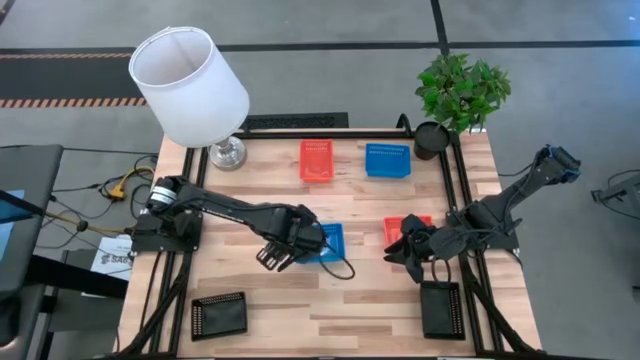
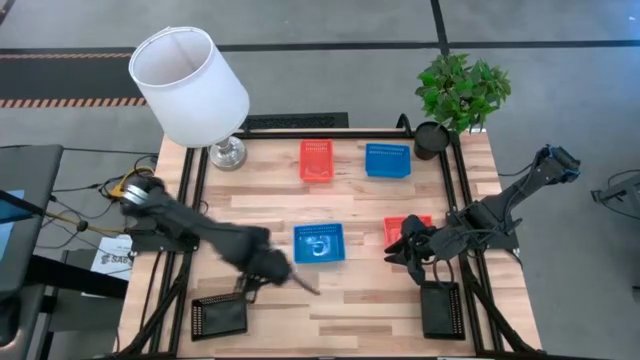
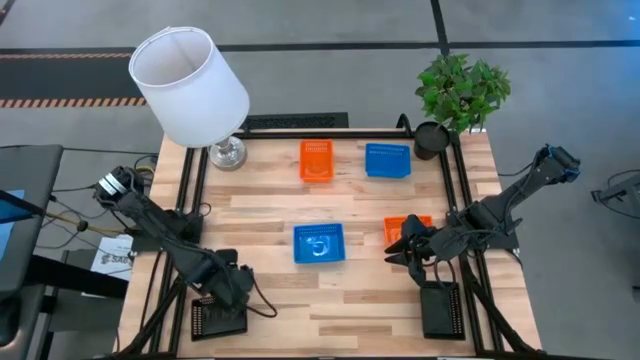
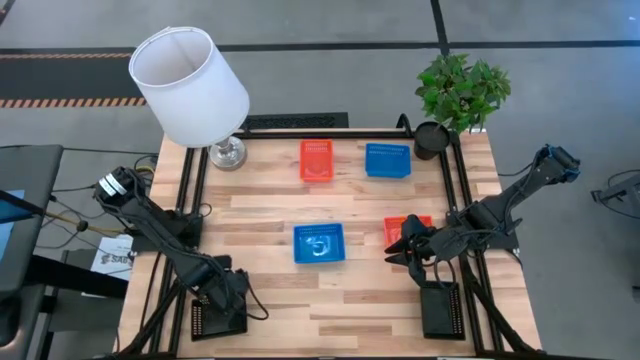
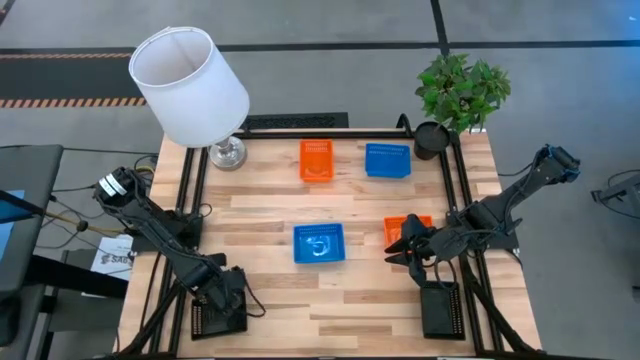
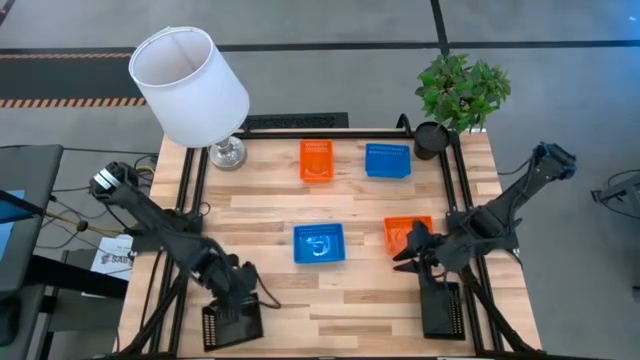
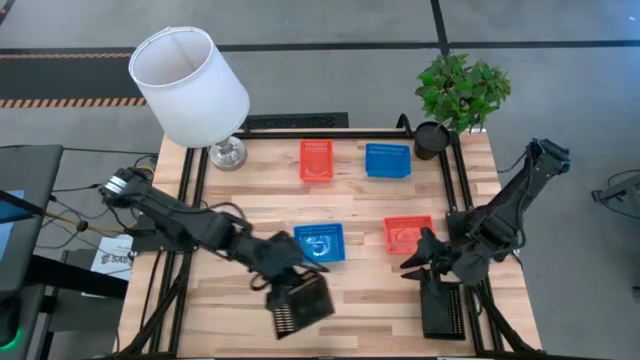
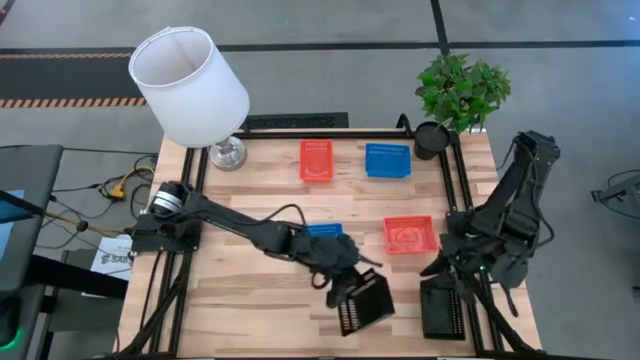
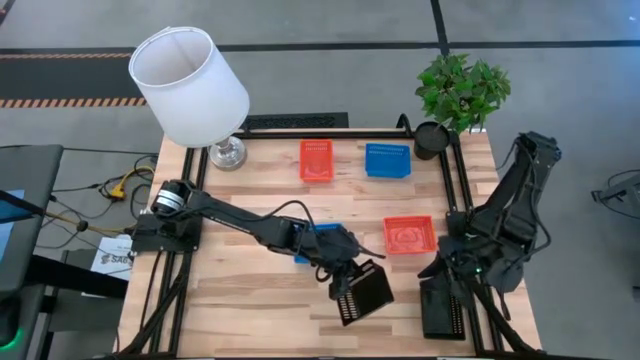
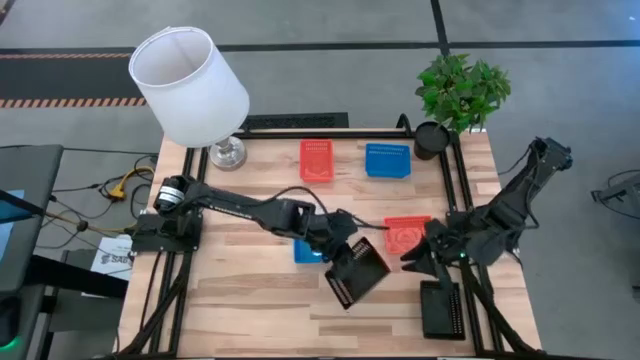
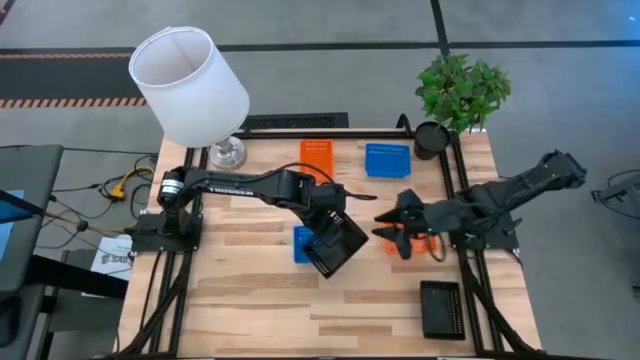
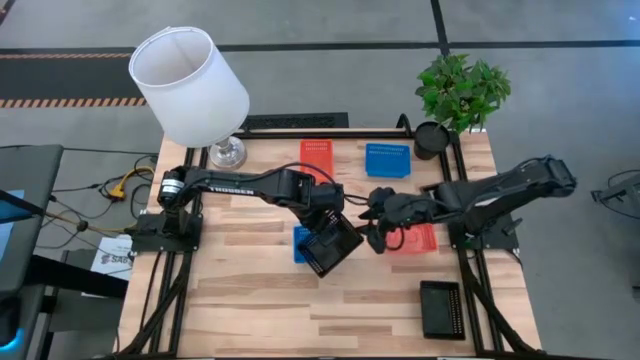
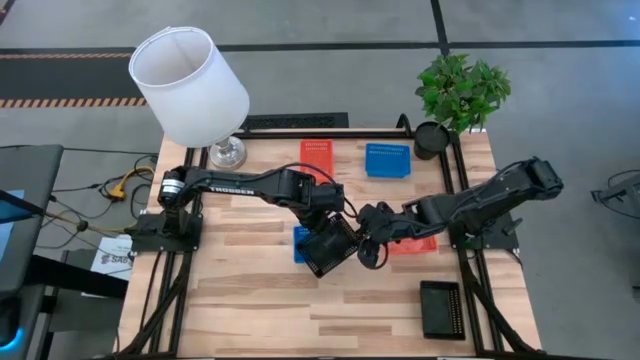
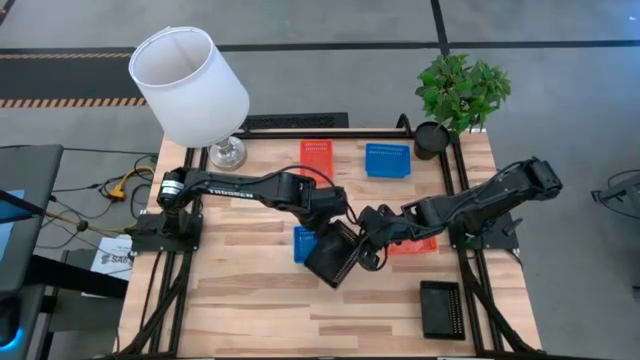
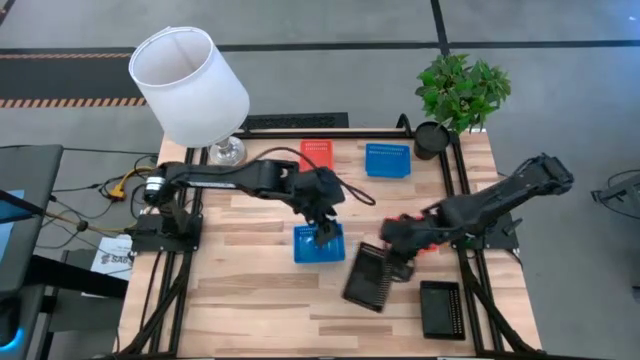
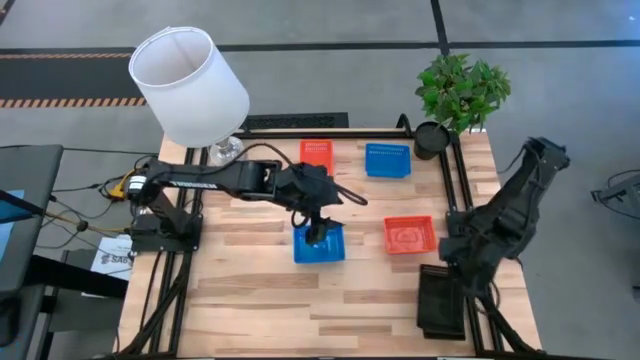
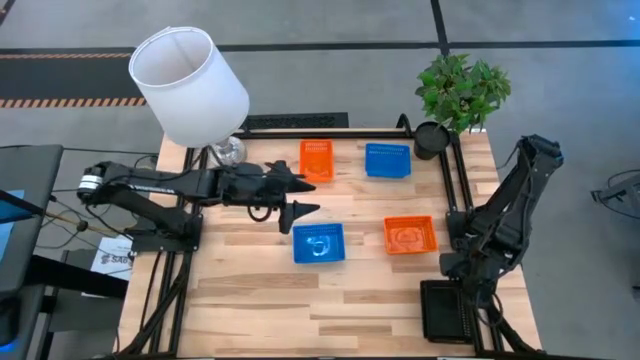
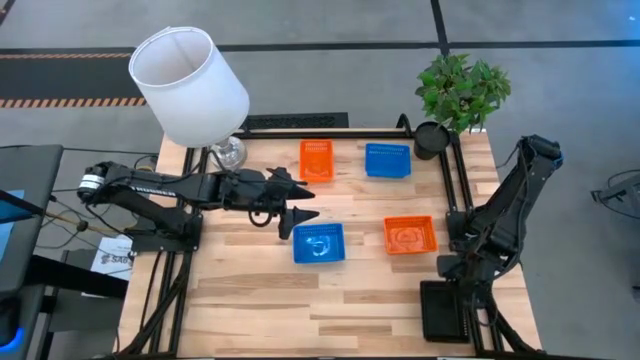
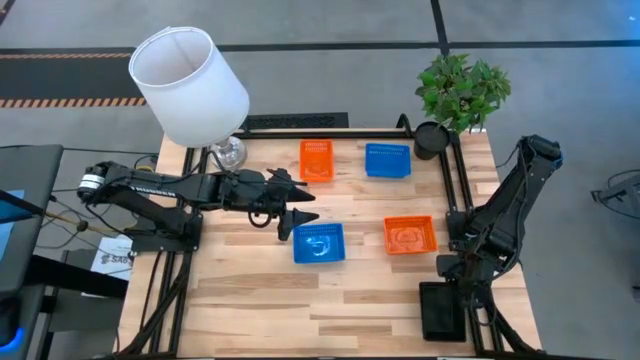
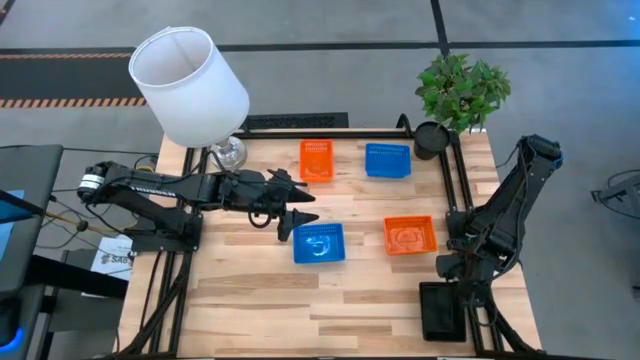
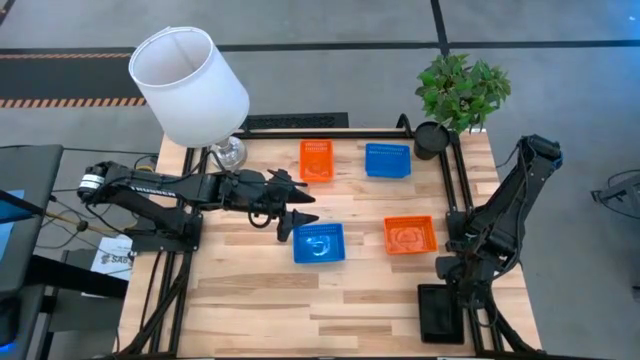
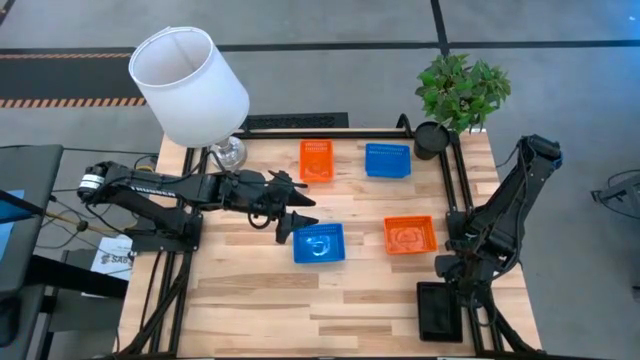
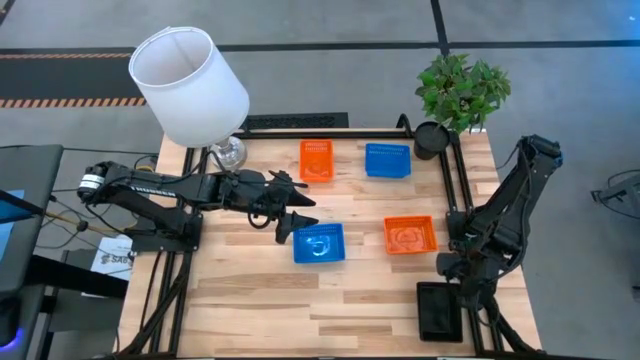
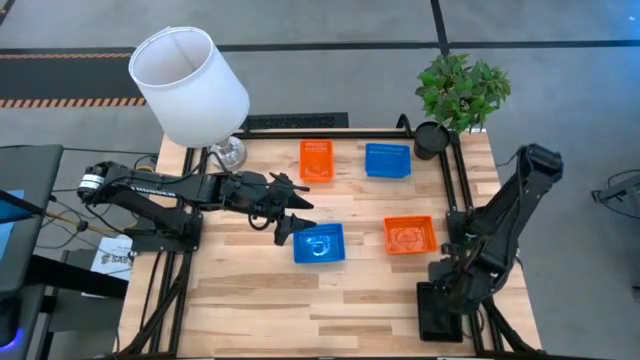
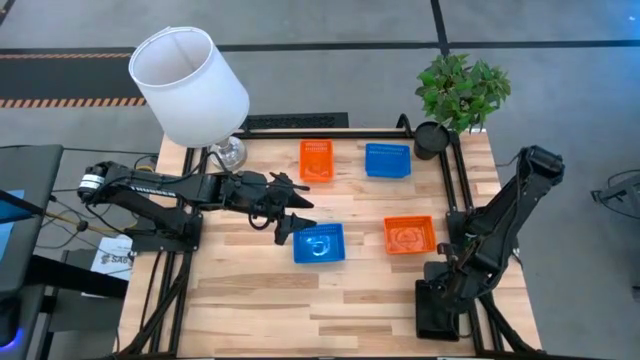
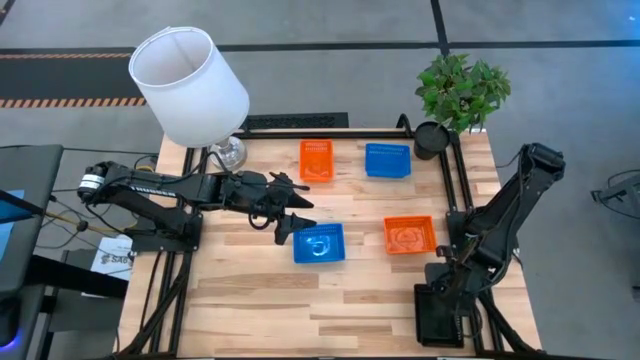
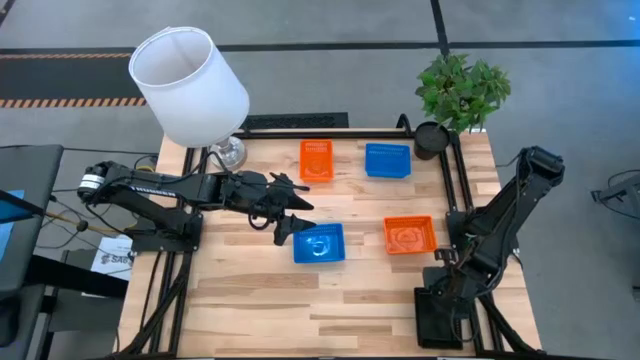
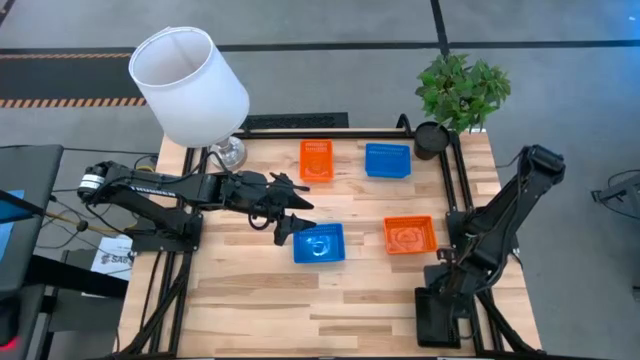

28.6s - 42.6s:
Stack the left black bin on top of the right black bin

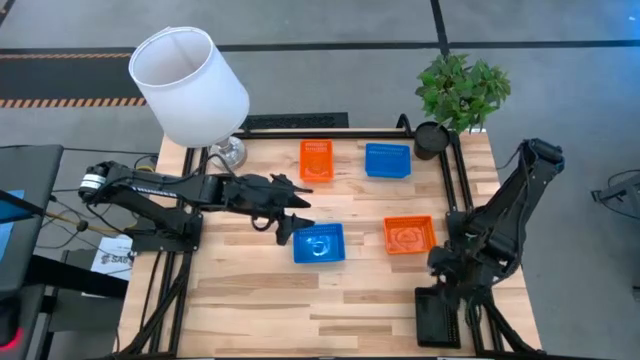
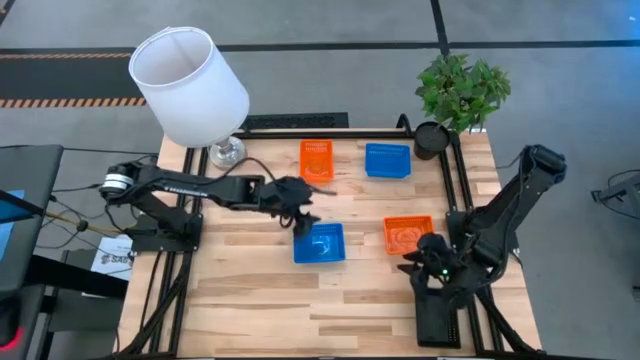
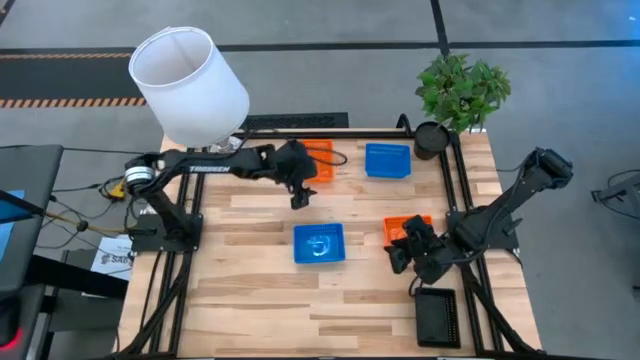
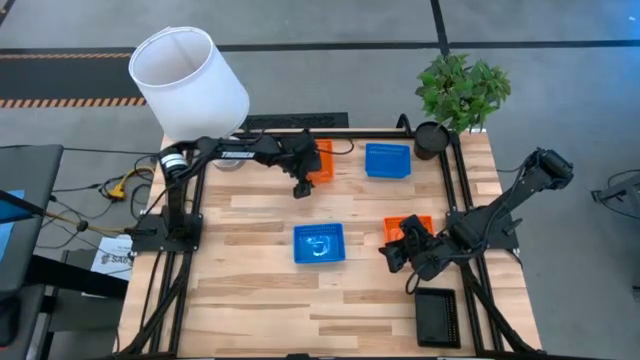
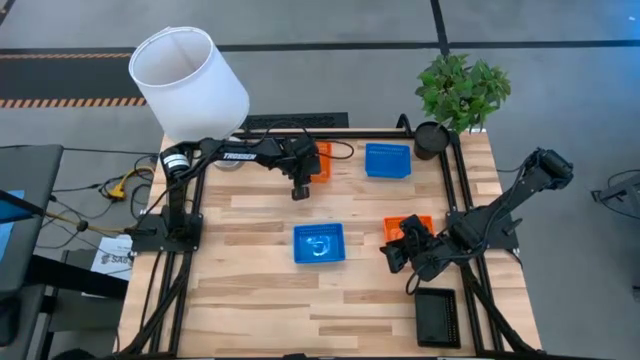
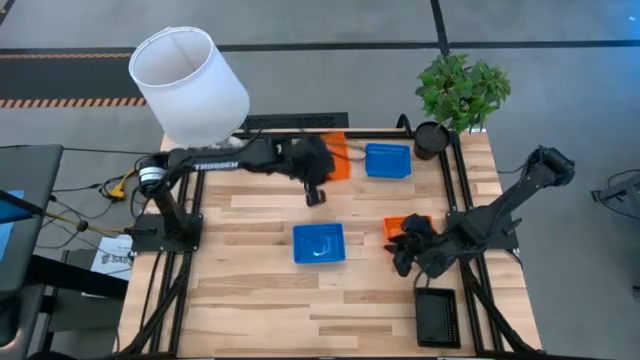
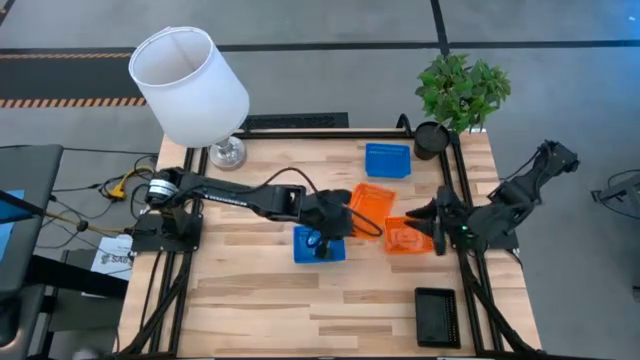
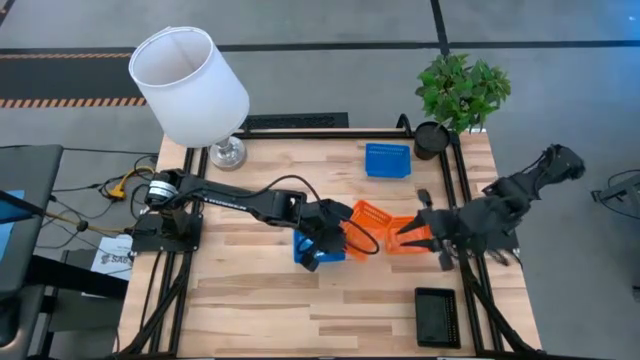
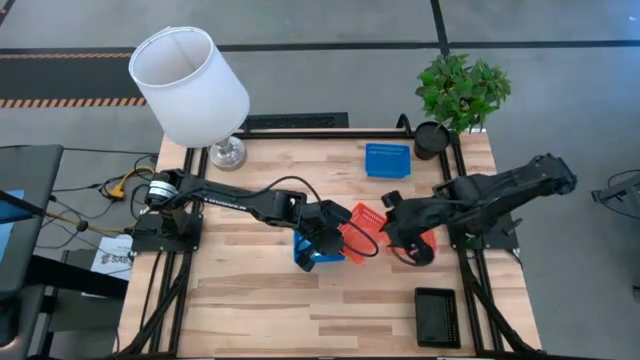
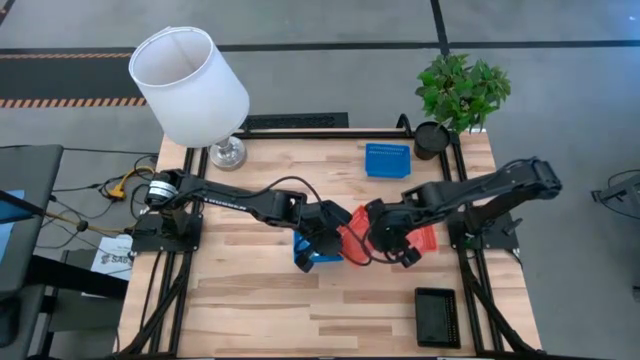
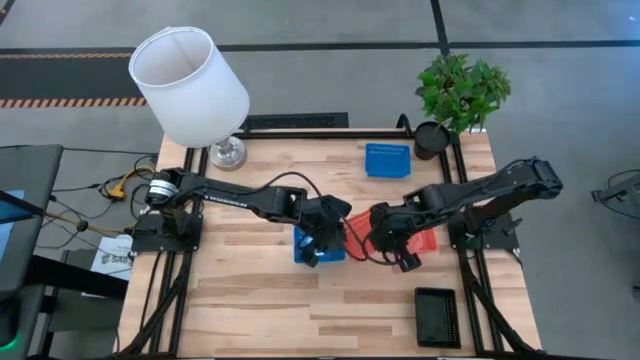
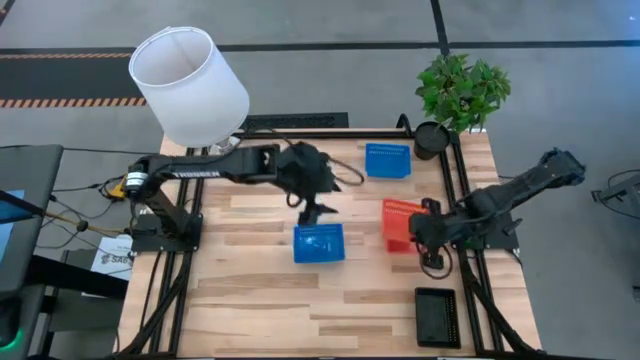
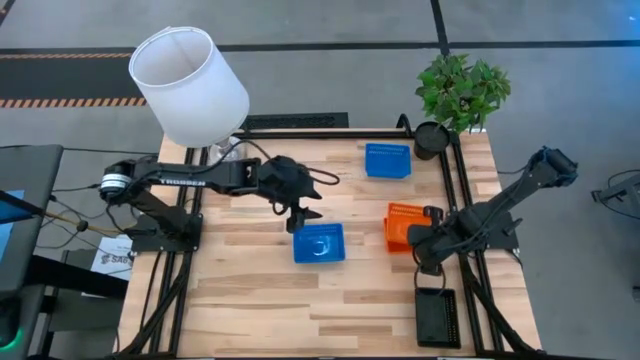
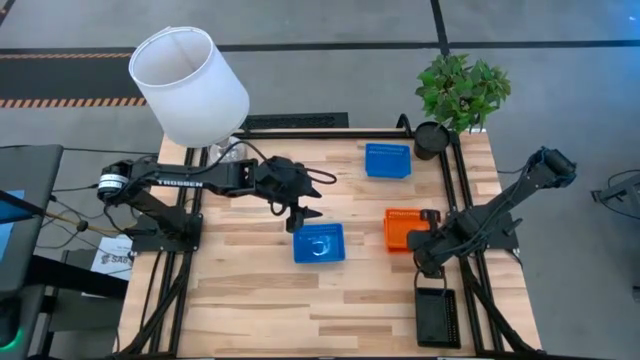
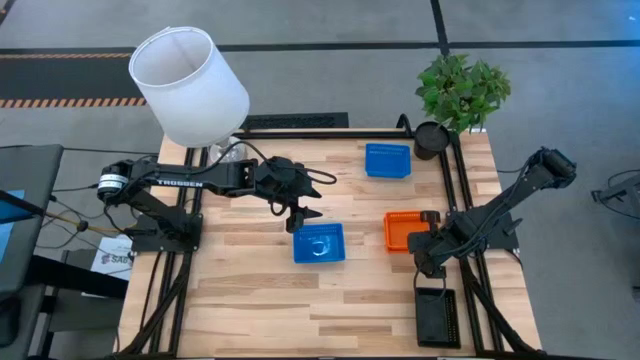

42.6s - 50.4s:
Stack the top orange bin on top of the bottom orange bin
